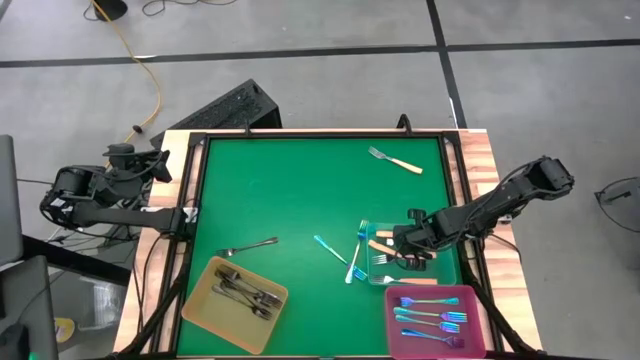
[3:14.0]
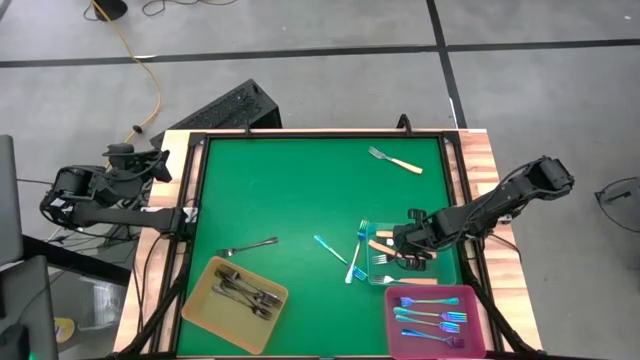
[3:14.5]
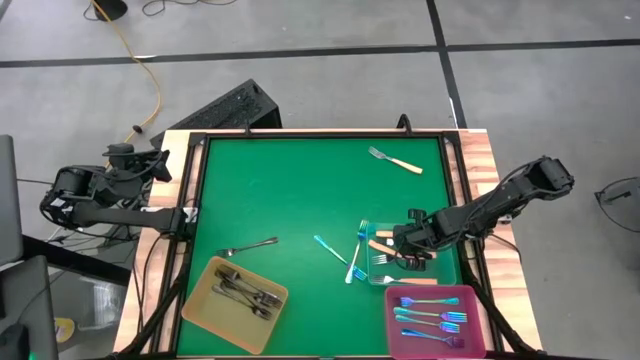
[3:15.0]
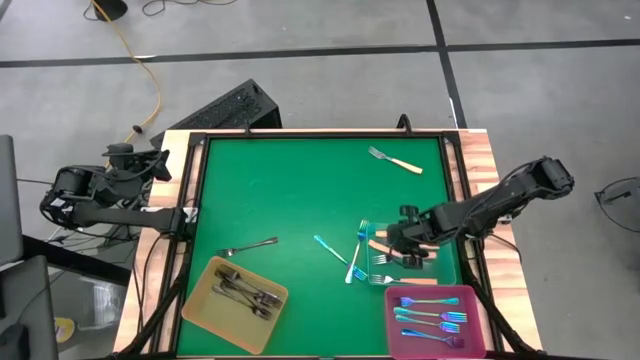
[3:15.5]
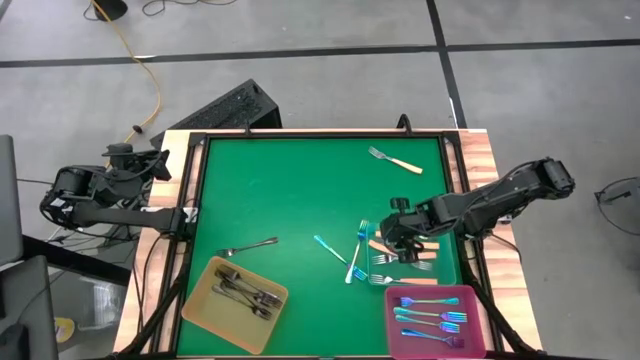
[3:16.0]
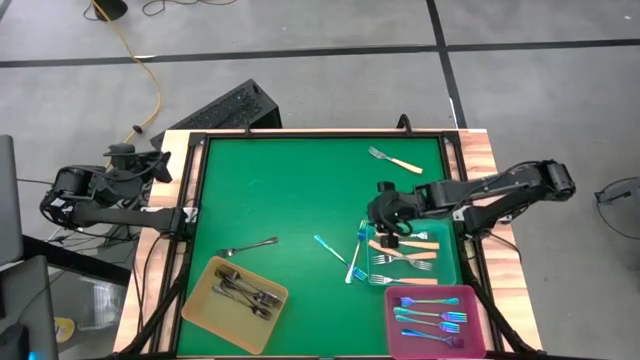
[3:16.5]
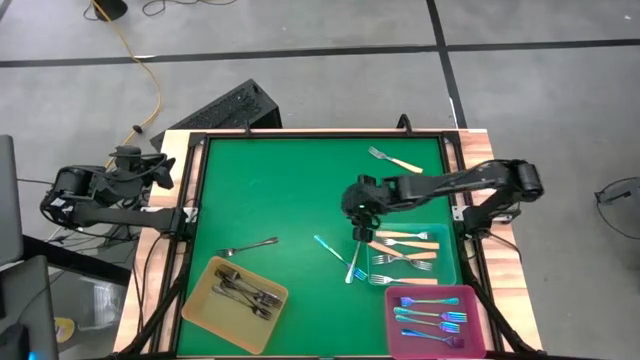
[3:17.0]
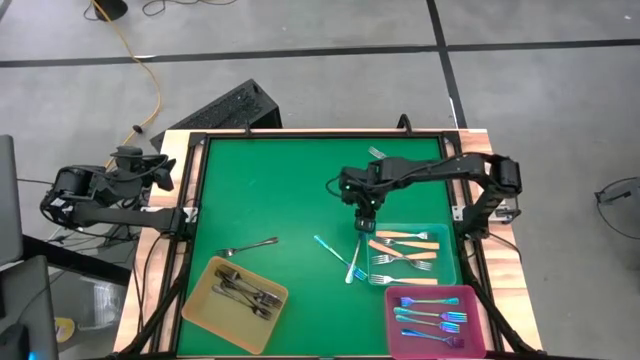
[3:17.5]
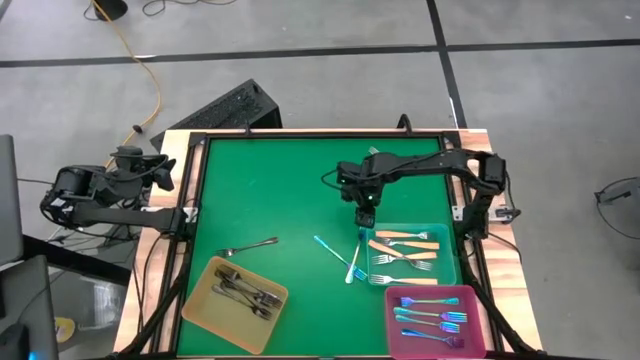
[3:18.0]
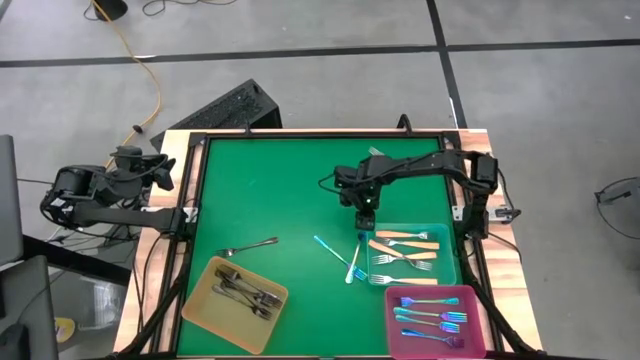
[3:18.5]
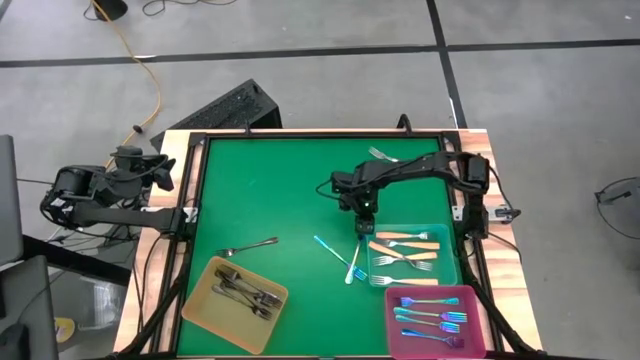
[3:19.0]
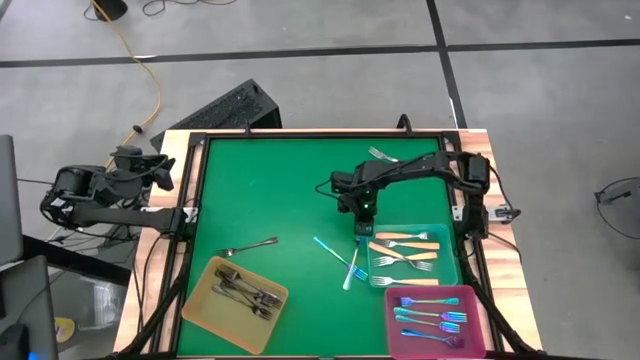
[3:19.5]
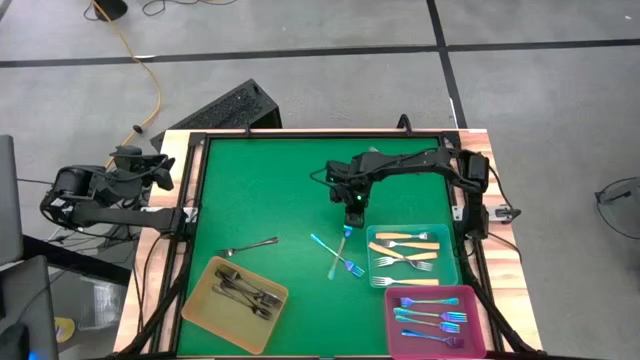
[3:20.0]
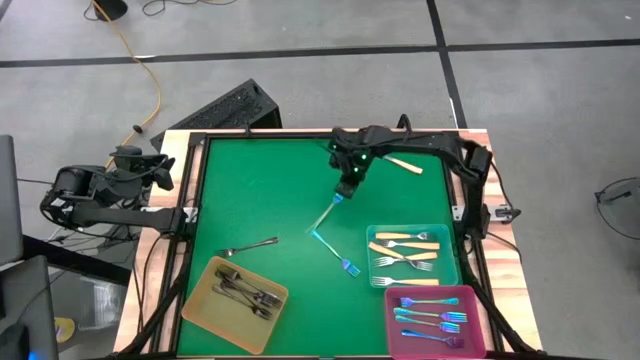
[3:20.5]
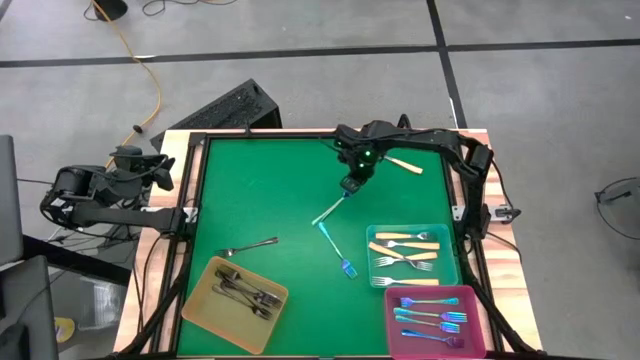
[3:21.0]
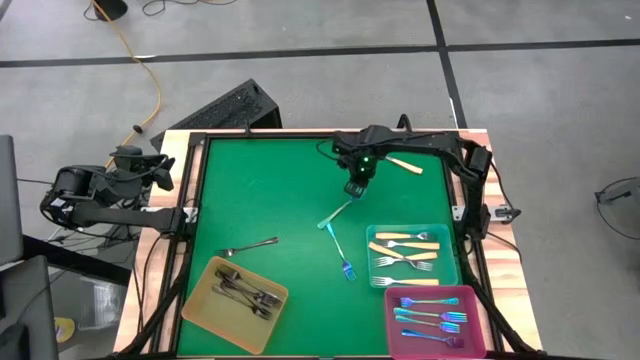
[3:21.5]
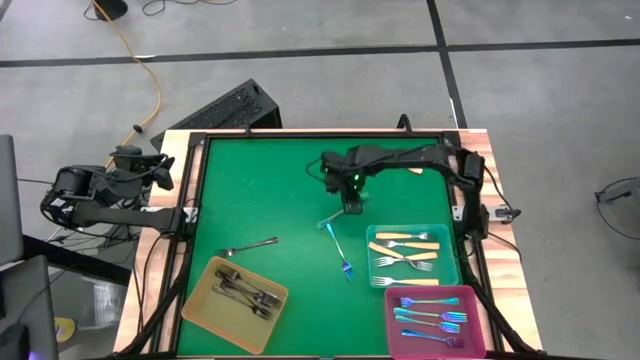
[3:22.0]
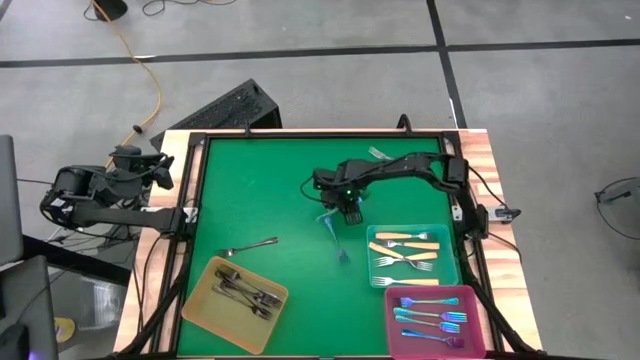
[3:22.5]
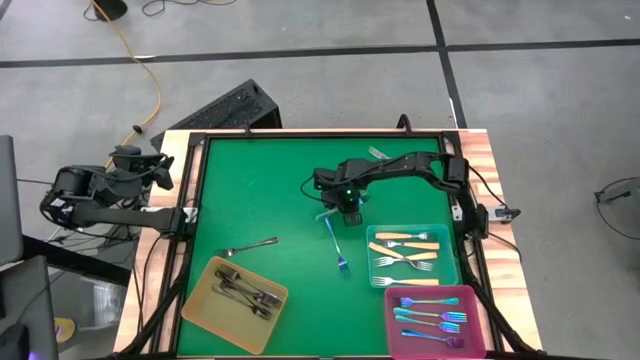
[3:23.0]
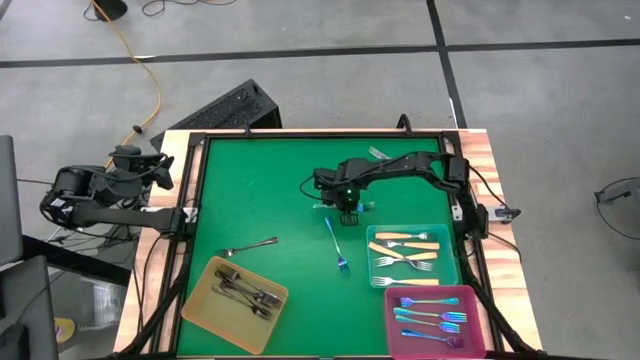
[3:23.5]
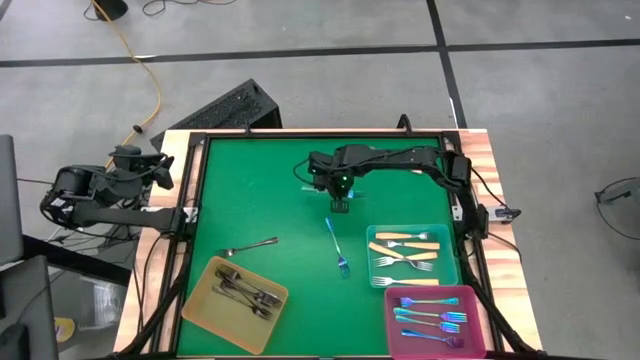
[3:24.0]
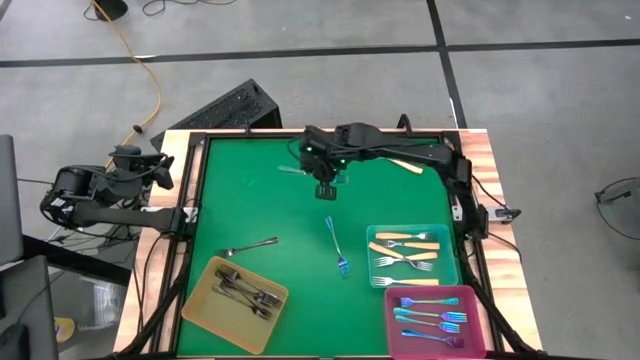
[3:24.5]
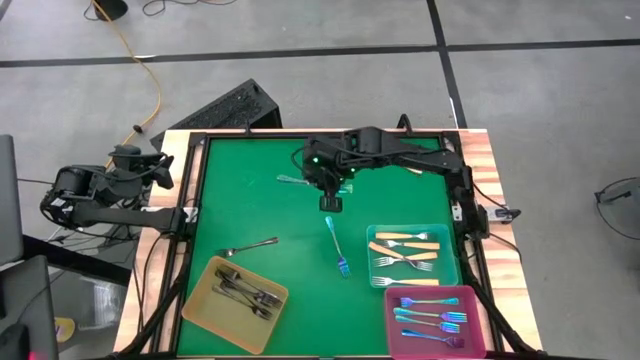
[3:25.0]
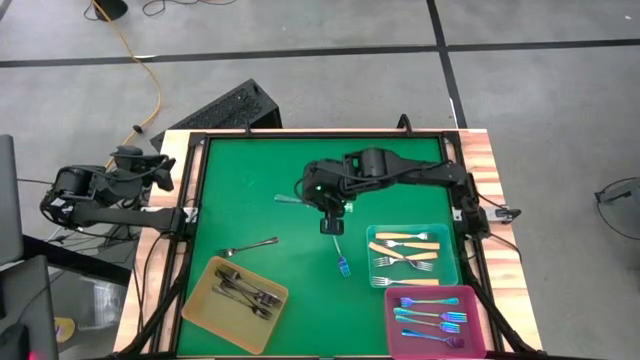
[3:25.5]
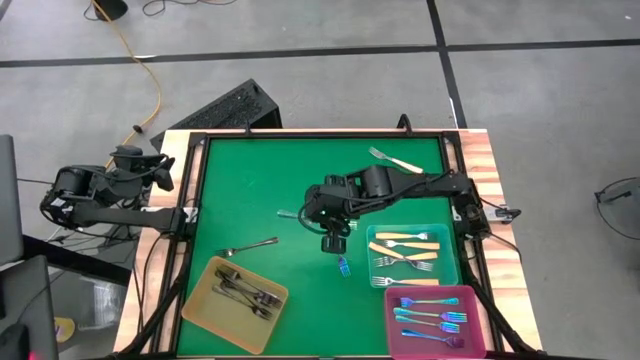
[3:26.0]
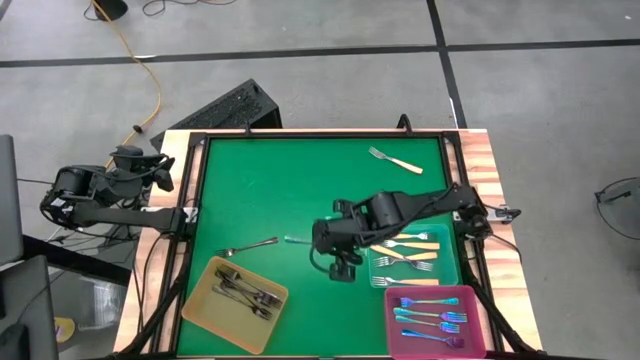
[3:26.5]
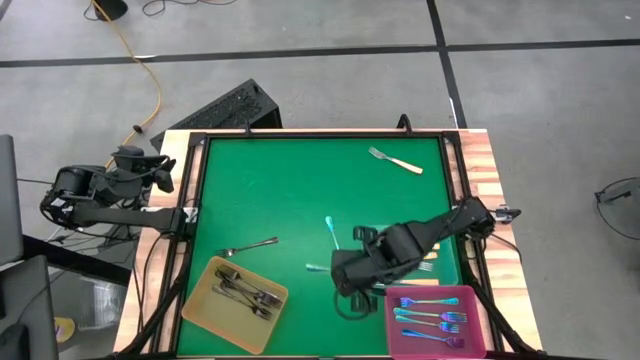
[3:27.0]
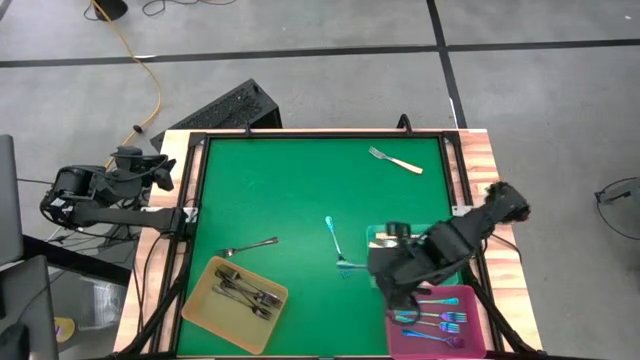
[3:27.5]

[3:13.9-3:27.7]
Task: Sort silverware by color (type)
Put the purple fork into the pink bin

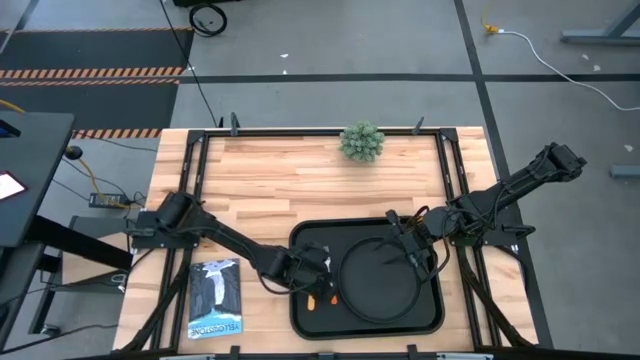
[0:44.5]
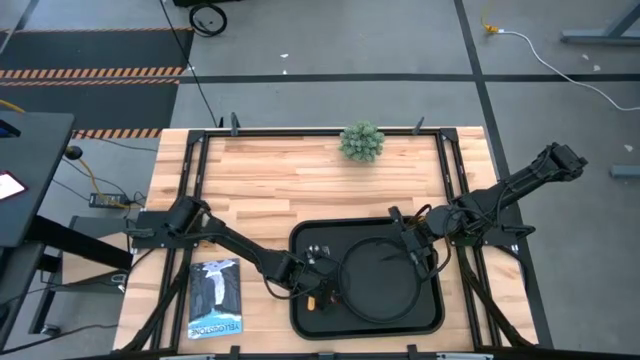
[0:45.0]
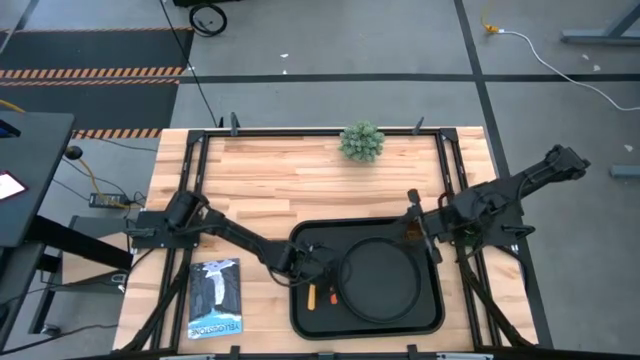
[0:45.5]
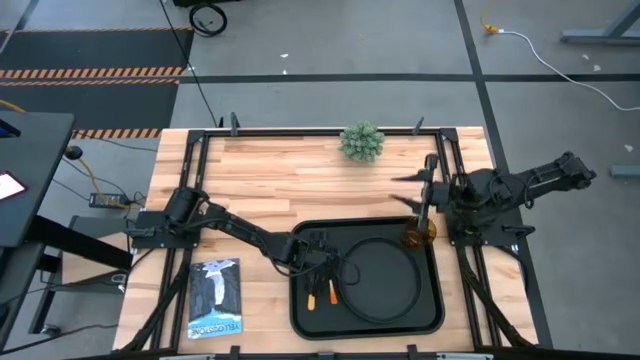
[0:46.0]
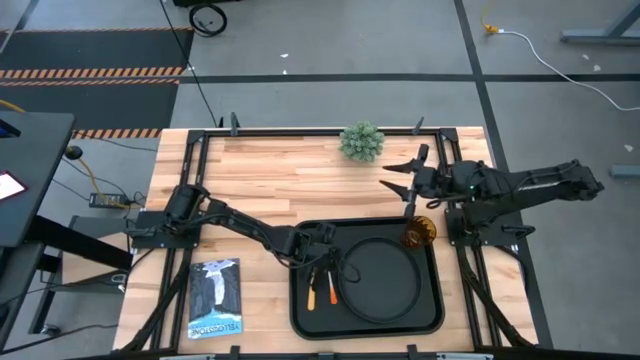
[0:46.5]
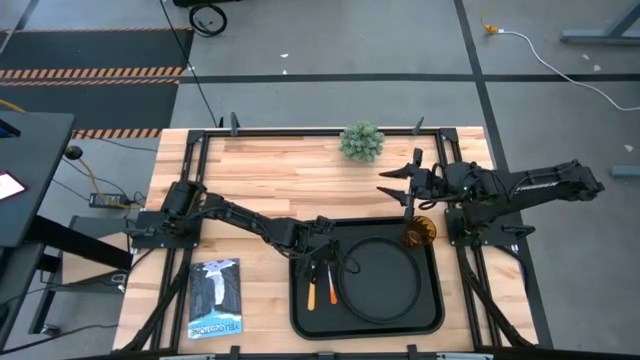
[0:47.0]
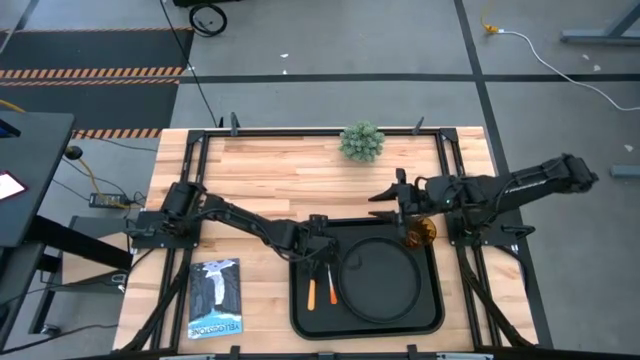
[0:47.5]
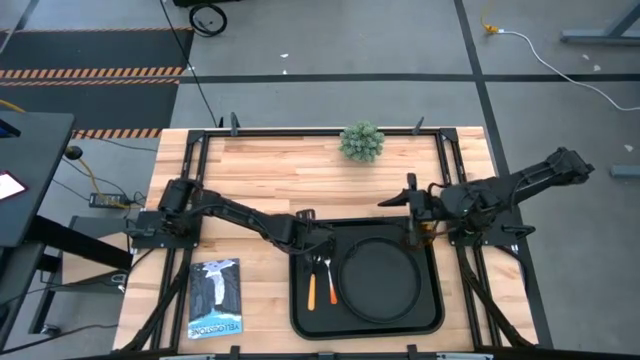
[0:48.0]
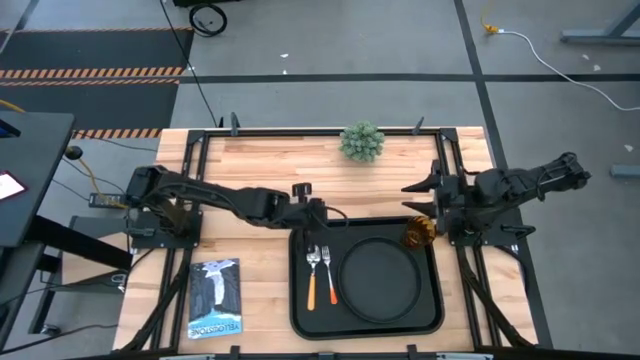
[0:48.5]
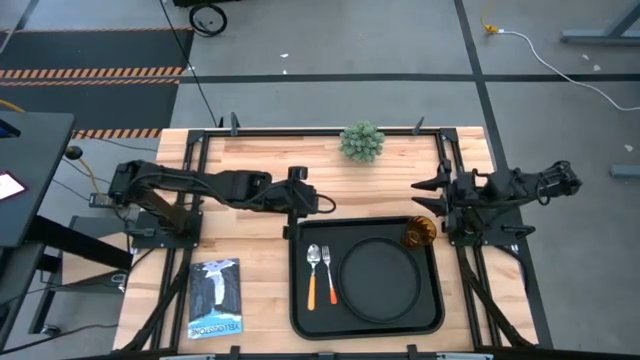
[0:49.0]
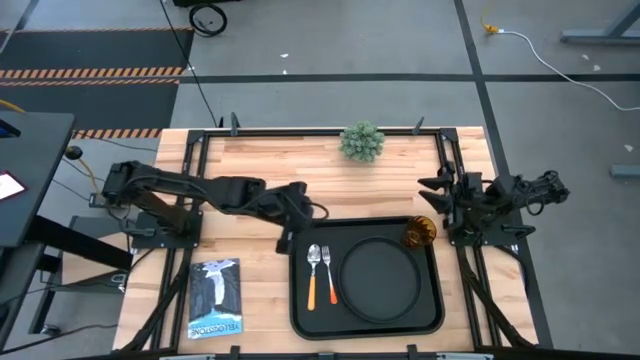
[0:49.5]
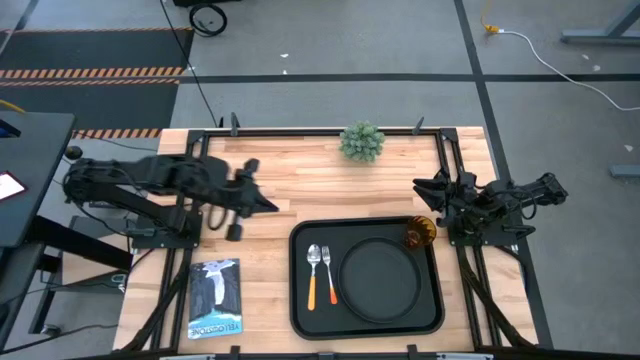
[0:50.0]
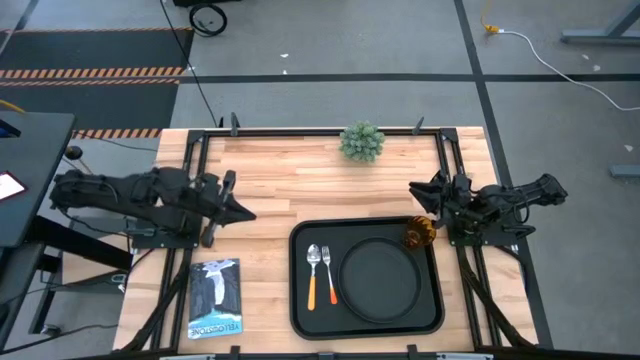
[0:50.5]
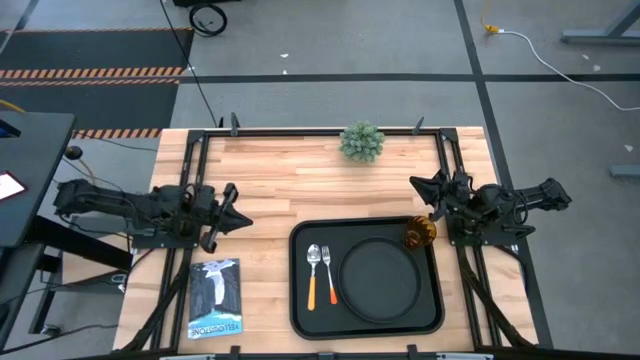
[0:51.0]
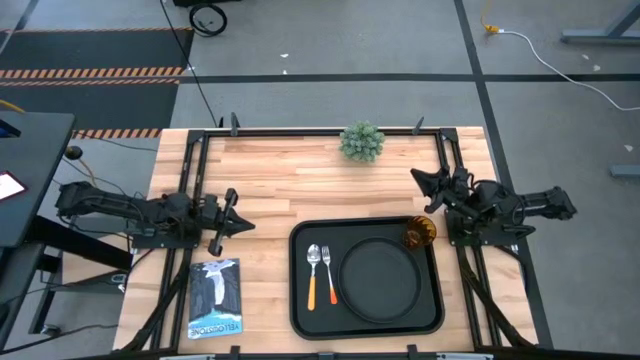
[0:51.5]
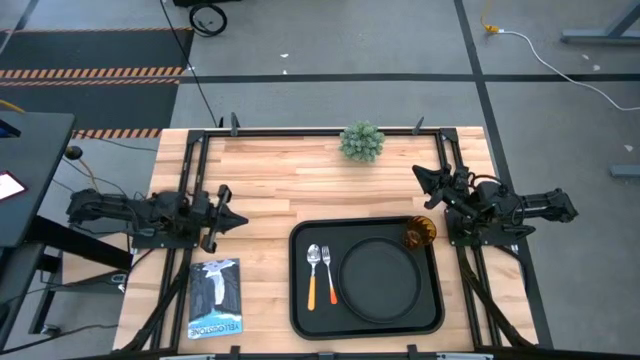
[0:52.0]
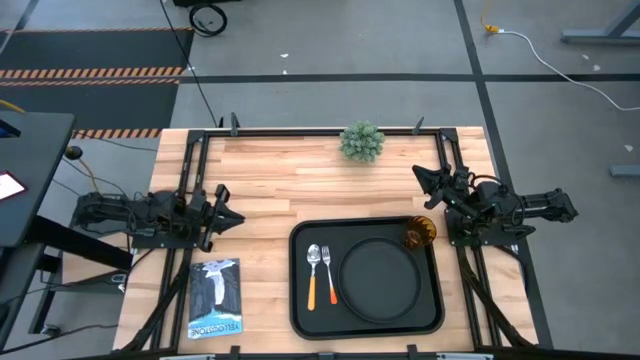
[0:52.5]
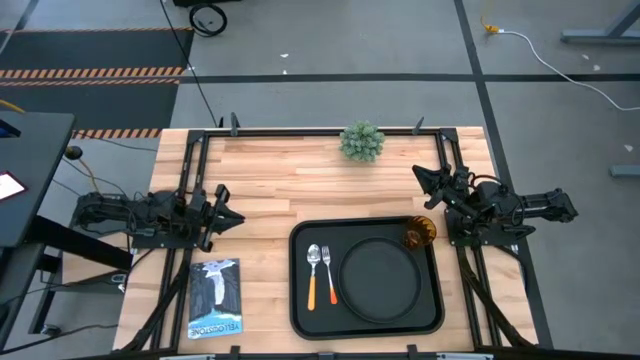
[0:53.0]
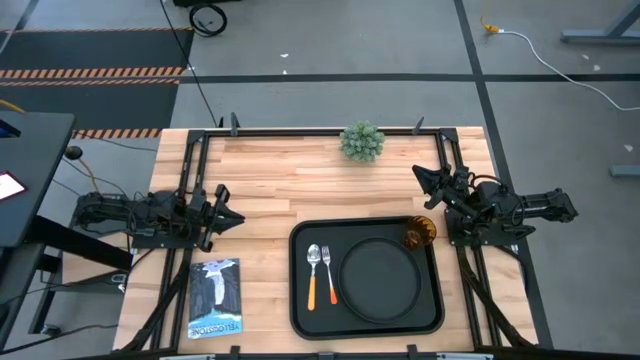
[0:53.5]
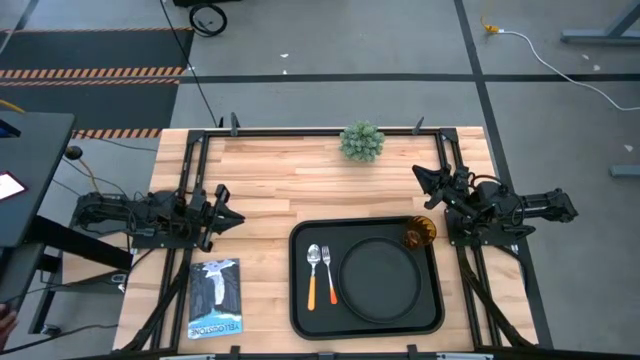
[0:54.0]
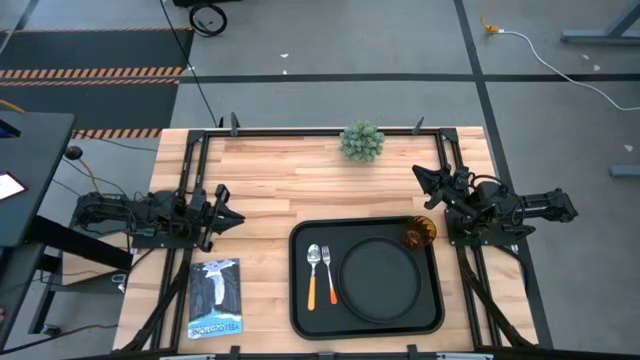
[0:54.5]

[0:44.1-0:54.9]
Task: Pick and place plate/cup/fork/spoon on tray
Return to Home Position
